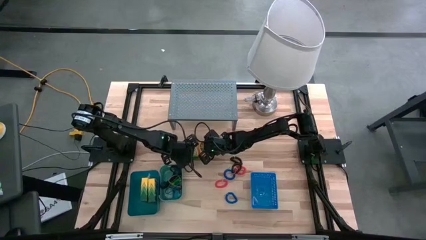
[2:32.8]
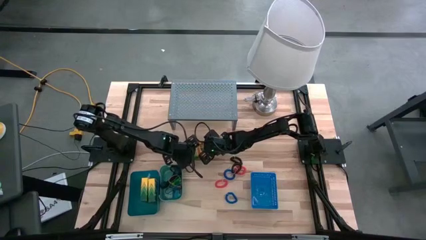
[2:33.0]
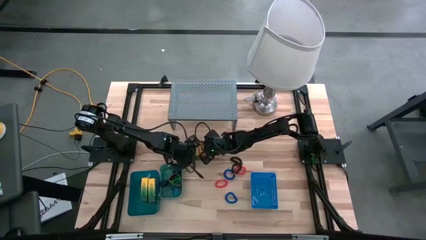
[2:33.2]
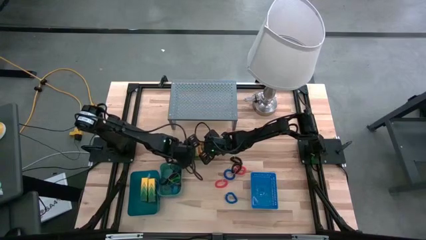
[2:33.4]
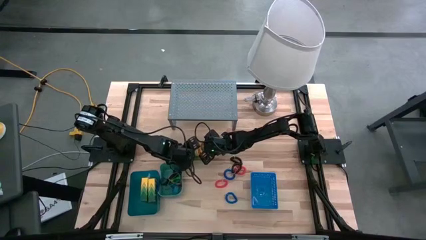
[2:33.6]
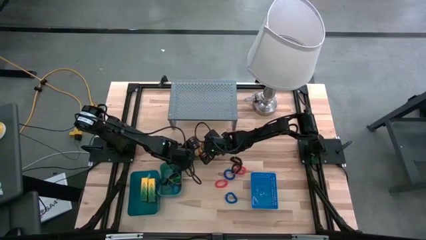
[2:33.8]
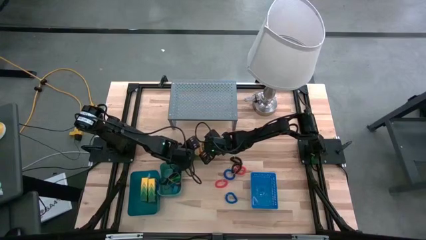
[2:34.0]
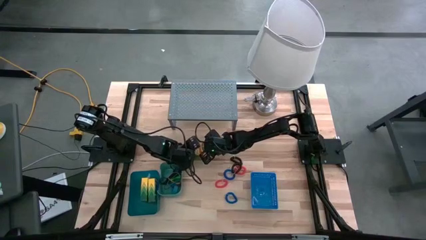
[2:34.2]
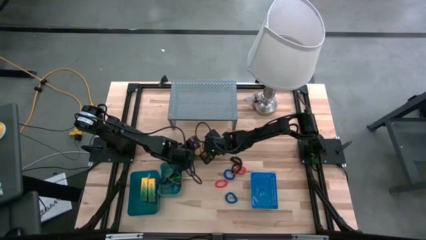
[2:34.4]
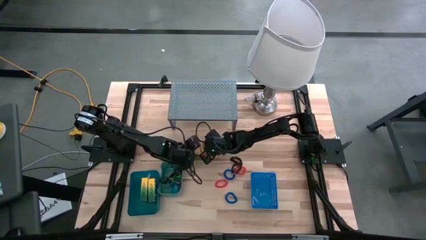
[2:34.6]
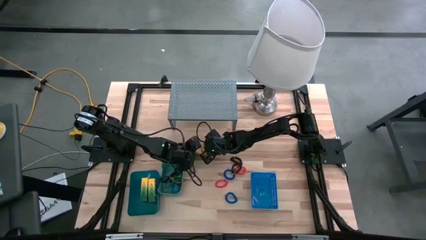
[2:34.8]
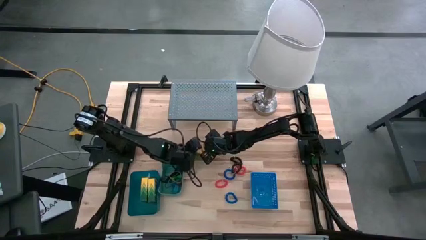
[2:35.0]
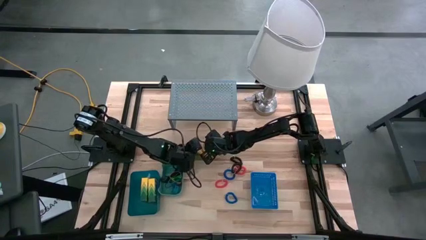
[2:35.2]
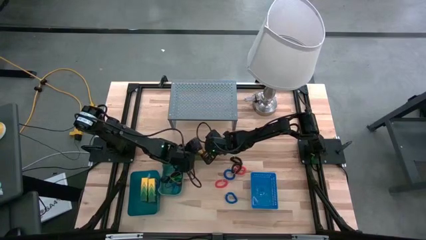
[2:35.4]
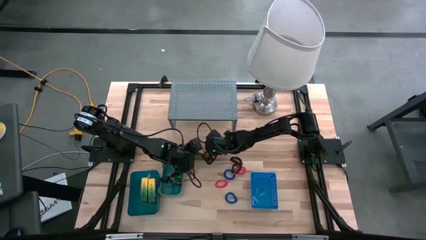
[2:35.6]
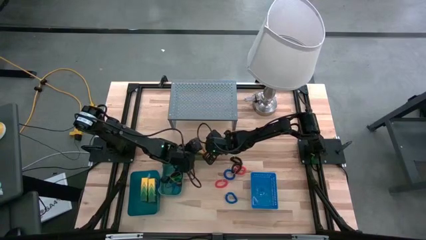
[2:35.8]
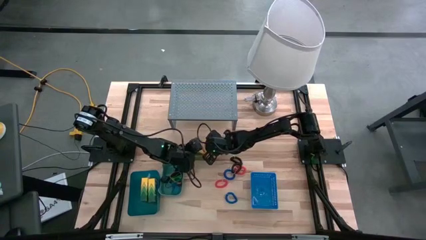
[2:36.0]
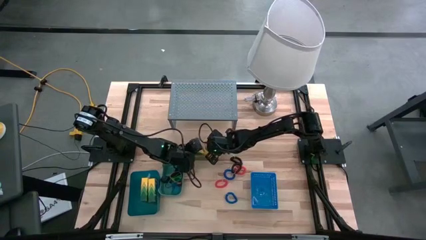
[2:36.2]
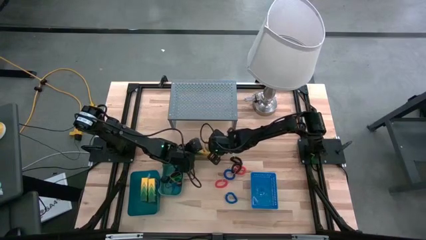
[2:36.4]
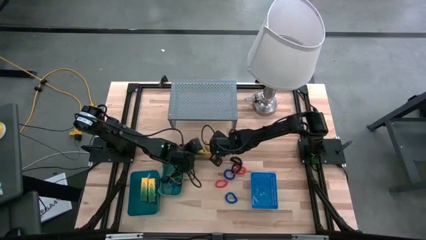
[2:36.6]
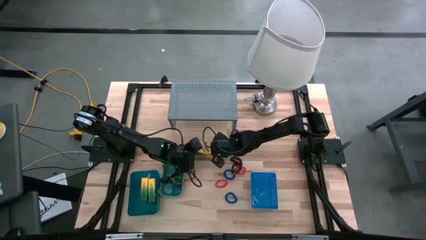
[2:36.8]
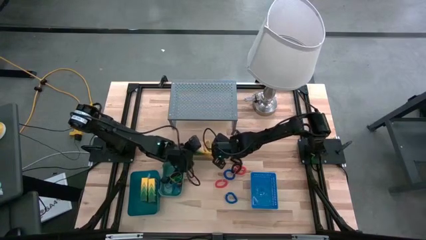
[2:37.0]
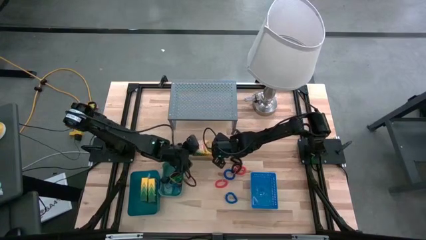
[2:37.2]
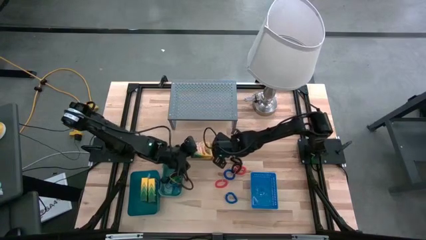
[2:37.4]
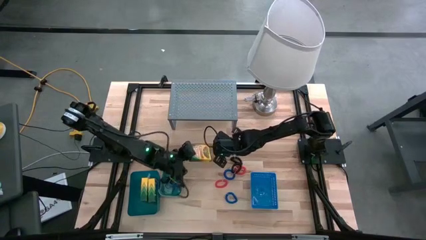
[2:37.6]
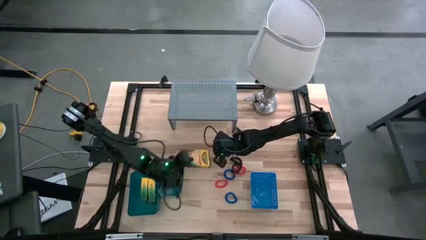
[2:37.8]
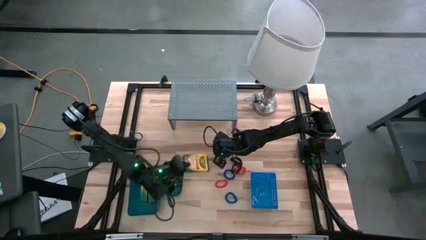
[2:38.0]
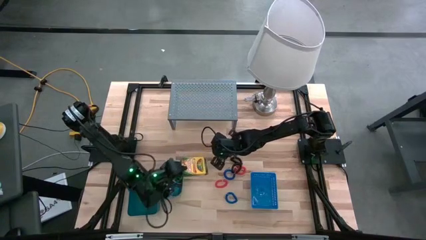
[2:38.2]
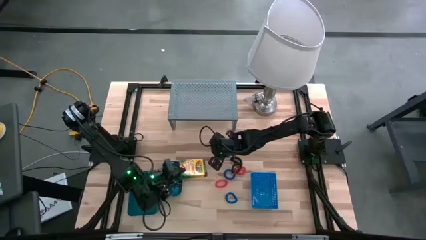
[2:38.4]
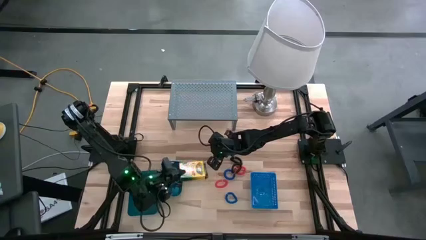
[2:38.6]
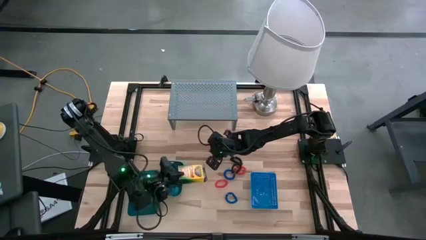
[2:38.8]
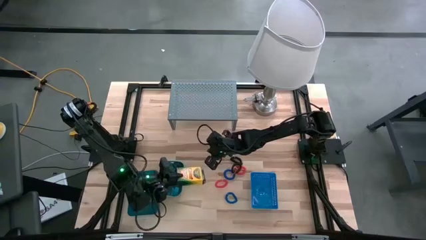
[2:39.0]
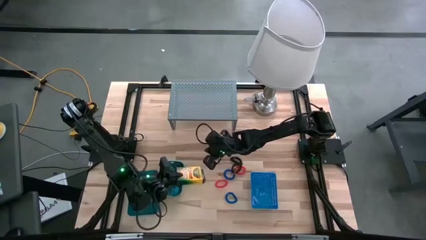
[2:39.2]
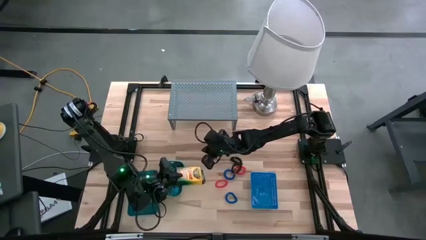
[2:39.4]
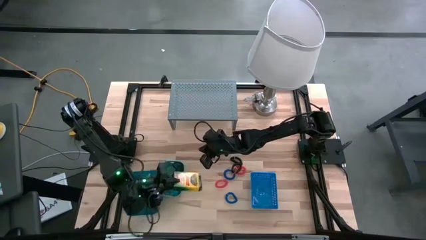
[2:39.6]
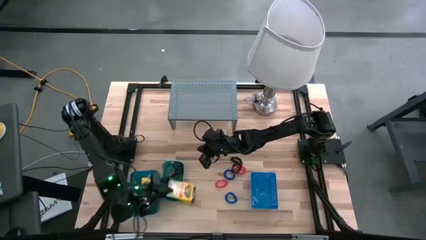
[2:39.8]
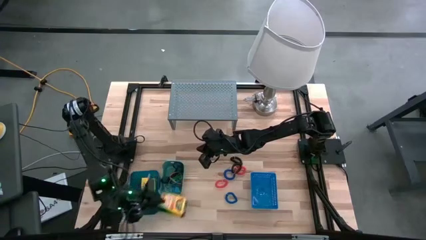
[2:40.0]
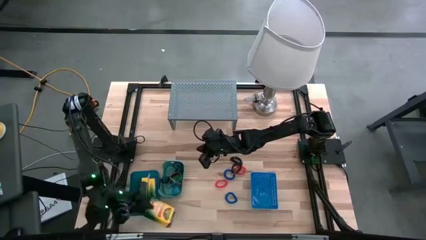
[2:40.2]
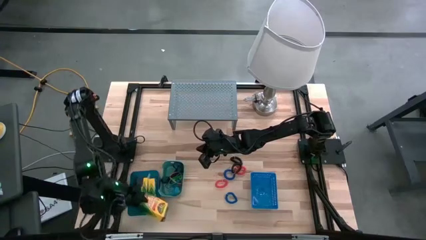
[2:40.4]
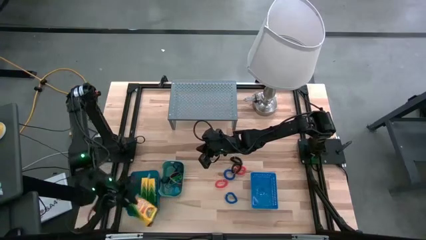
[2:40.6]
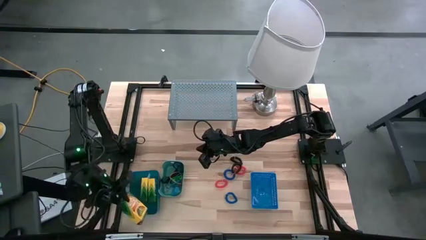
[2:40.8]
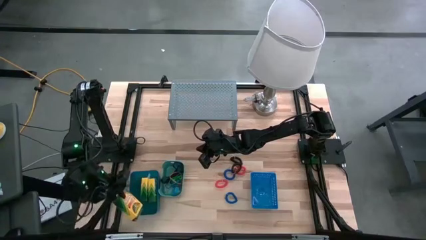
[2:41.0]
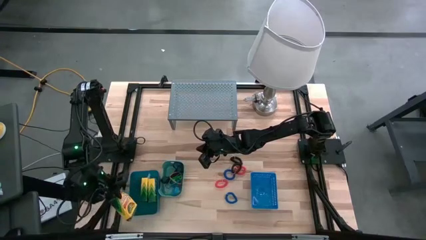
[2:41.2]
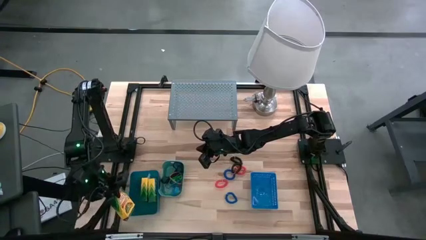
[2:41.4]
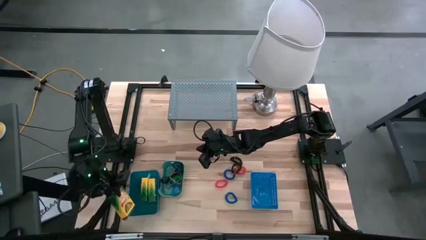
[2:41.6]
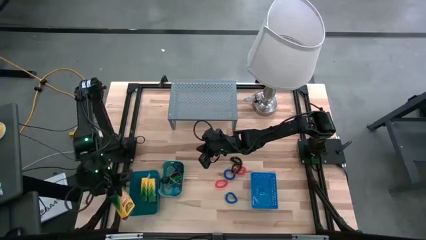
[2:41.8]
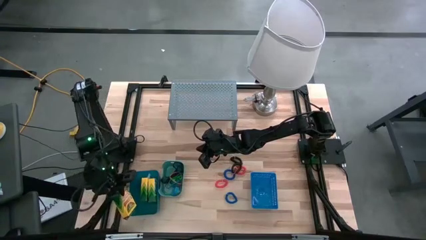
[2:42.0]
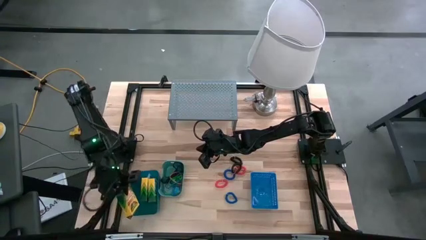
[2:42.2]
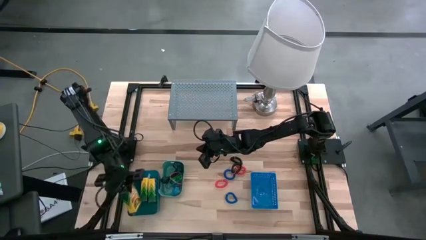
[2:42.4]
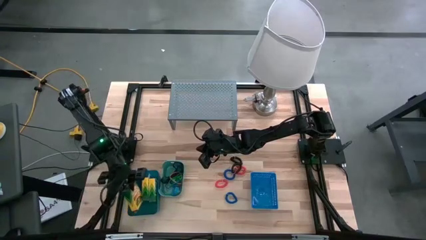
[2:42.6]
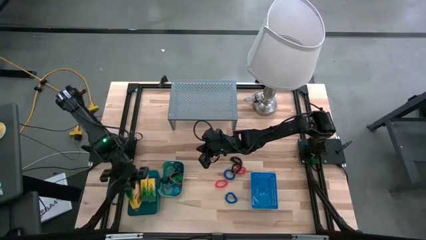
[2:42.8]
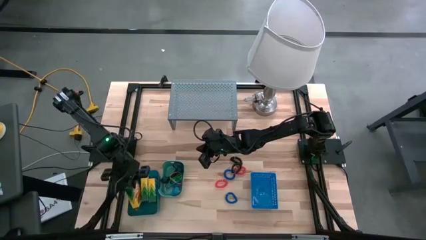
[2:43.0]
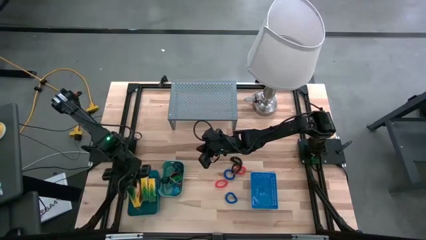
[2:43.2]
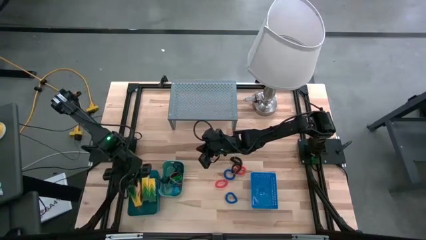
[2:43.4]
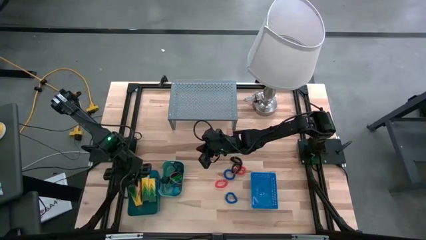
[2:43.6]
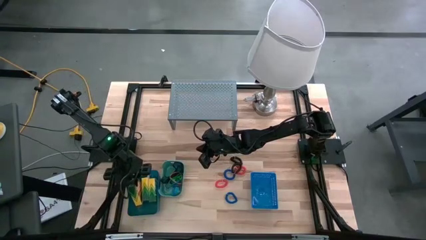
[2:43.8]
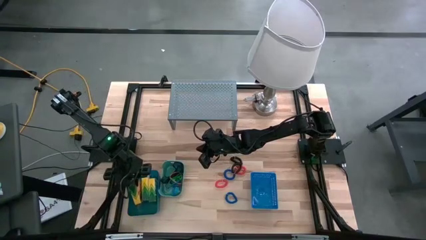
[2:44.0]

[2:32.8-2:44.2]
Task: Pick & Place Office Desk Supplies
Put the box of crayons into the light blue bin

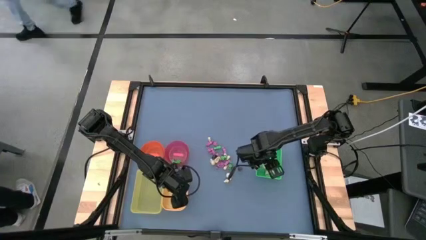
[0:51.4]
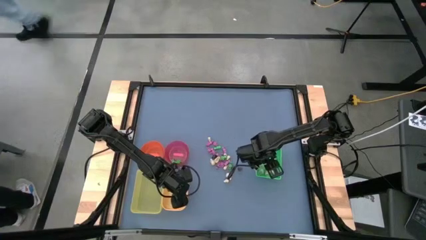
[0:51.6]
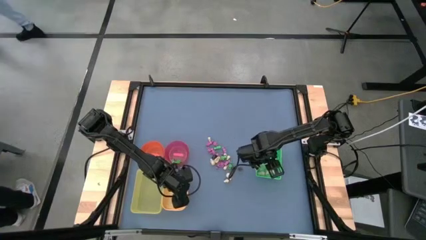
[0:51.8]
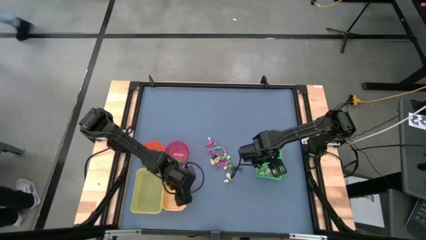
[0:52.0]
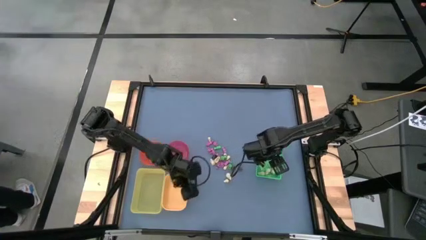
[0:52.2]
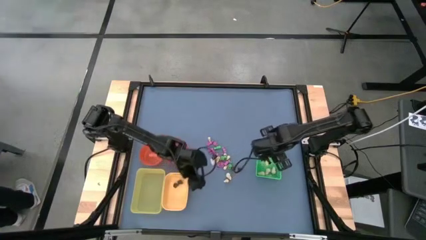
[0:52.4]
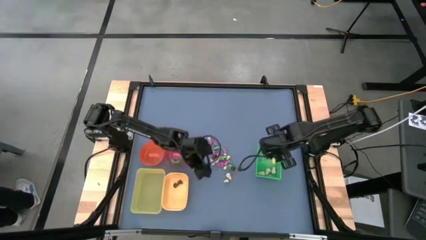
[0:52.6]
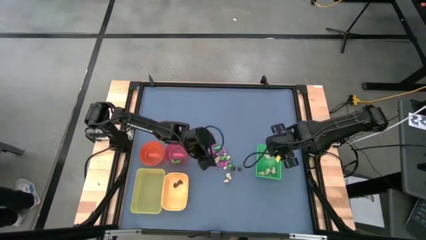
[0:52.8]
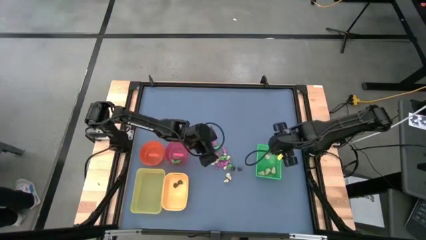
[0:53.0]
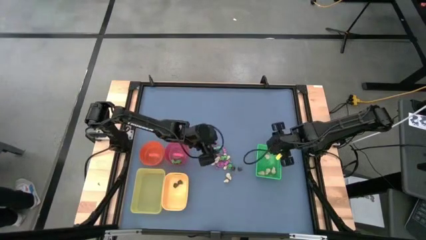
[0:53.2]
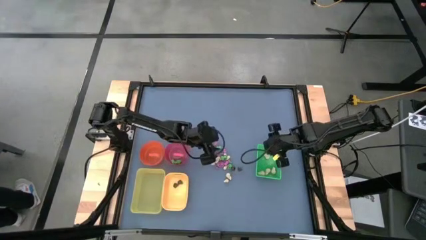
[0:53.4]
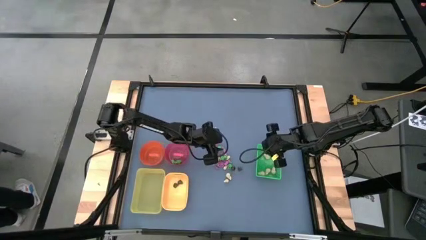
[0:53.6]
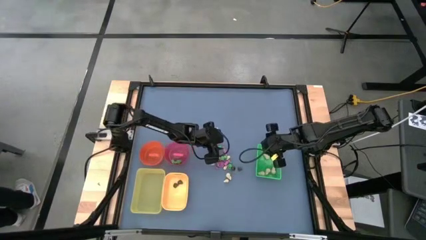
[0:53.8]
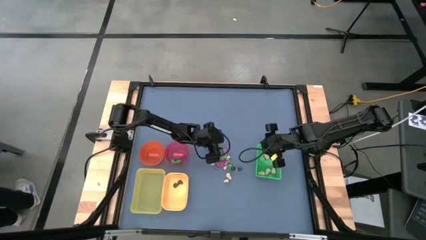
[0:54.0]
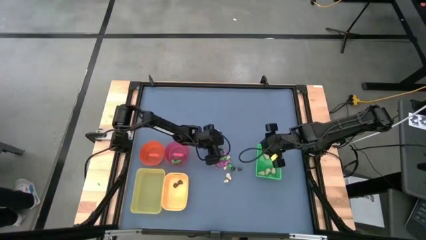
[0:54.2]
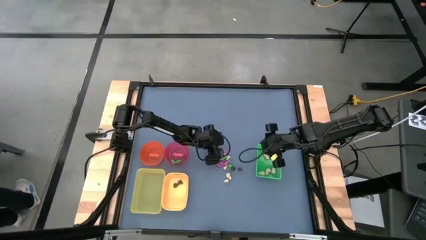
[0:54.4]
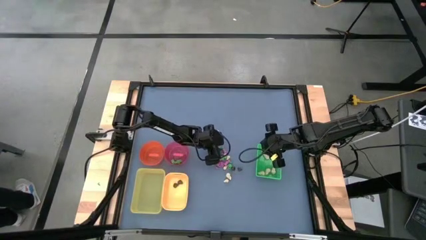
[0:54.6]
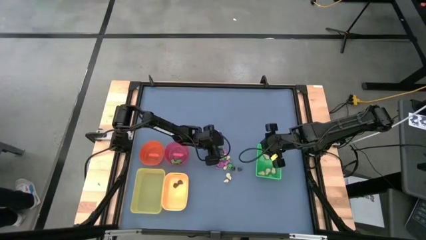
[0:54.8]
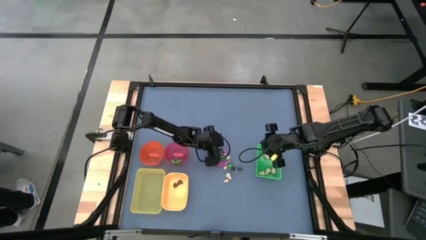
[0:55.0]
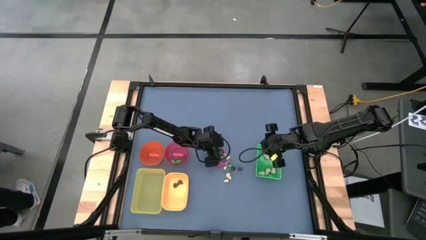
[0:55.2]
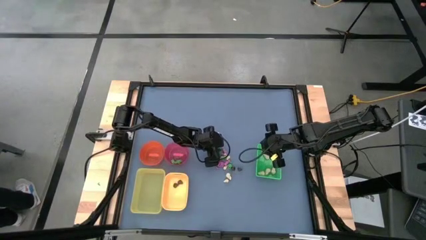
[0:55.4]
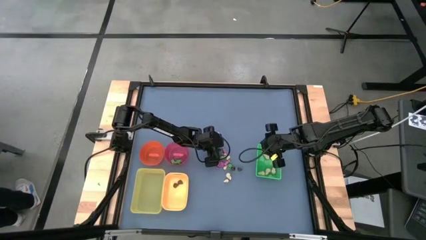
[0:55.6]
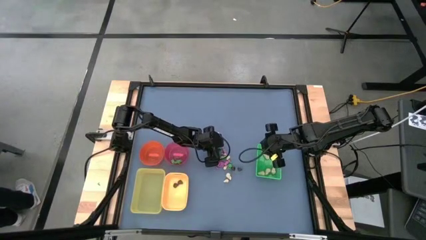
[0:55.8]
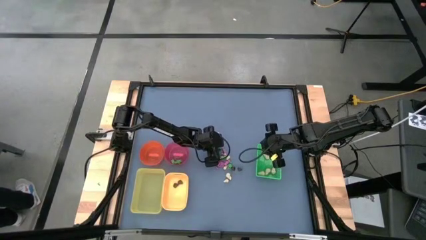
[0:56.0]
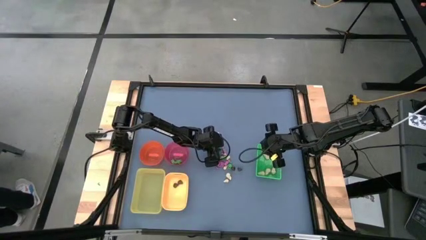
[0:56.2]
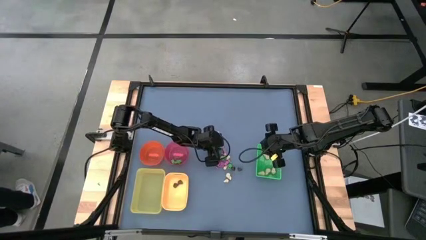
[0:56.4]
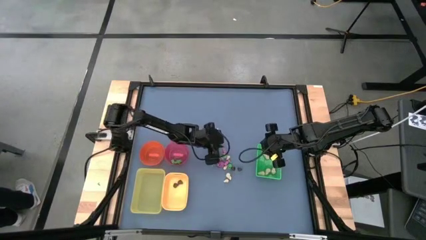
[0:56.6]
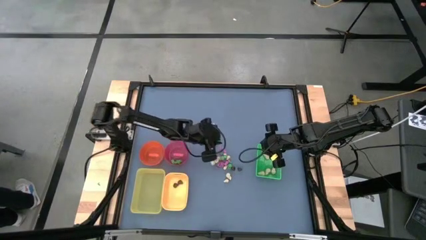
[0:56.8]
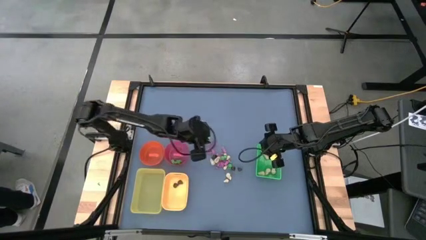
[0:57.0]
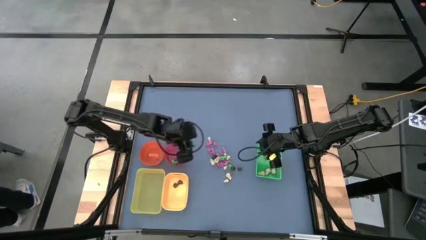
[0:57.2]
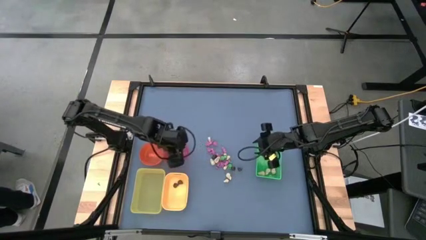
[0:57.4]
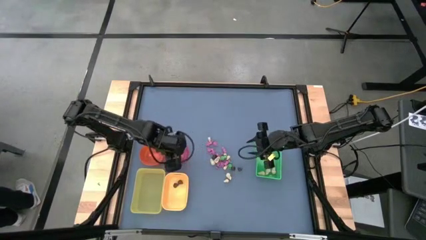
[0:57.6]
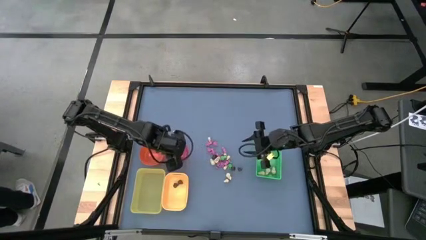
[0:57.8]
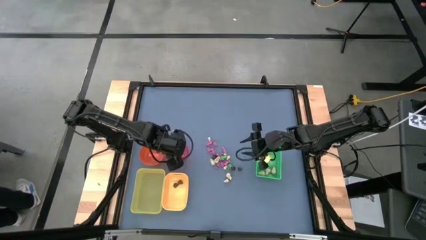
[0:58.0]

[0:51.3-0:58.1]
Task: Sort Halloween decoration
Put the green skeleton toy into the red bowl
